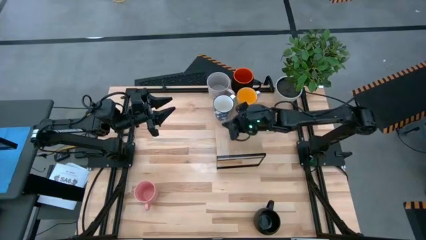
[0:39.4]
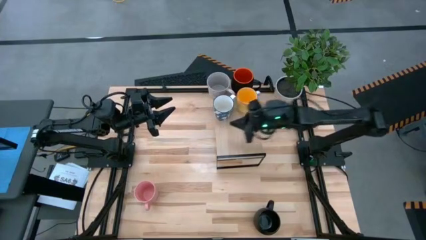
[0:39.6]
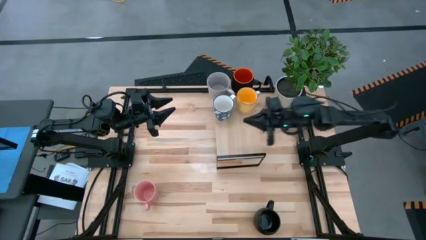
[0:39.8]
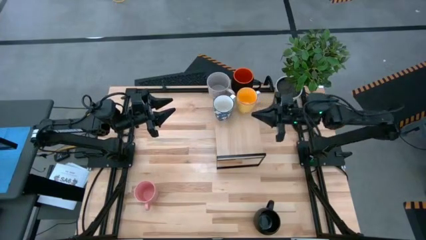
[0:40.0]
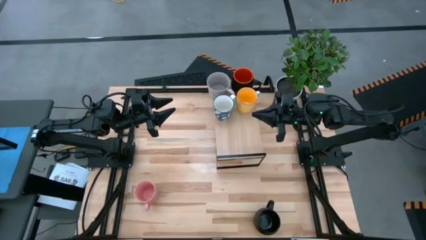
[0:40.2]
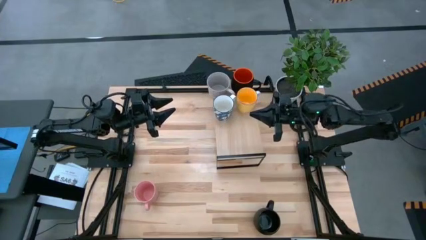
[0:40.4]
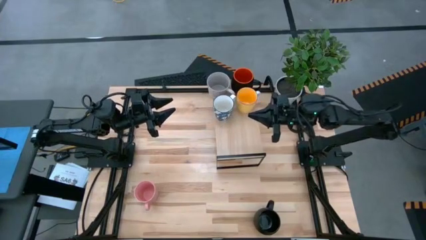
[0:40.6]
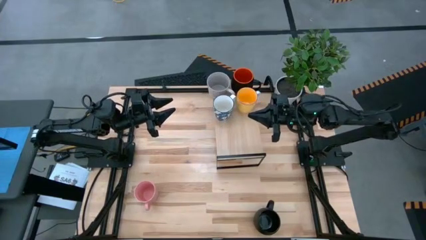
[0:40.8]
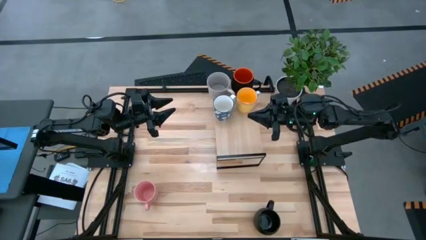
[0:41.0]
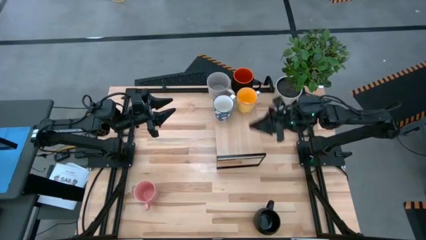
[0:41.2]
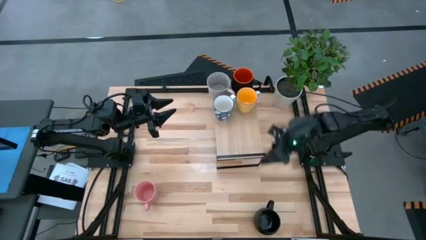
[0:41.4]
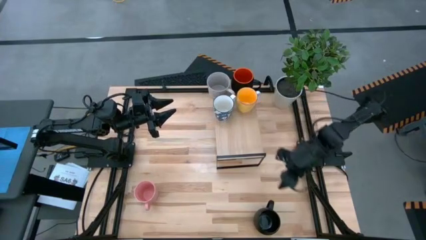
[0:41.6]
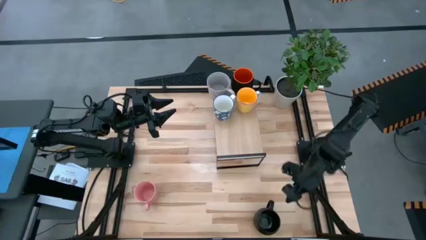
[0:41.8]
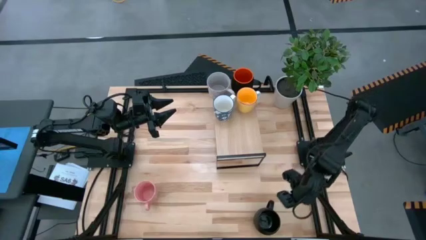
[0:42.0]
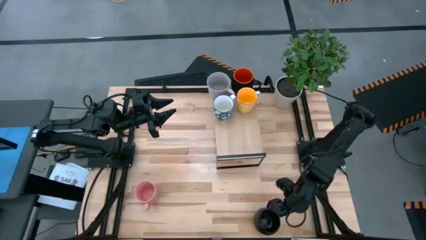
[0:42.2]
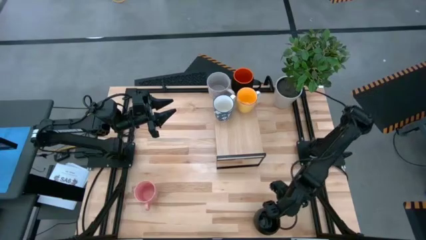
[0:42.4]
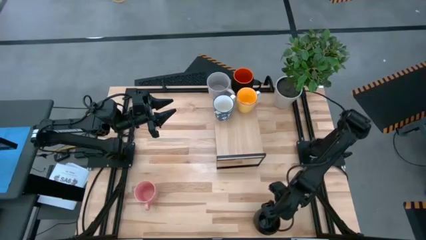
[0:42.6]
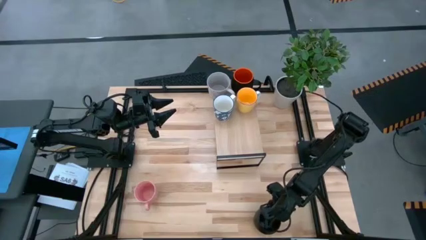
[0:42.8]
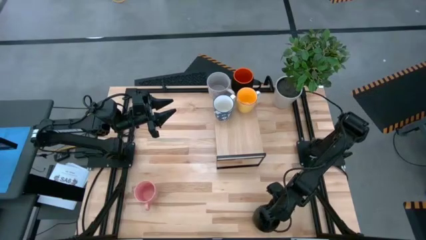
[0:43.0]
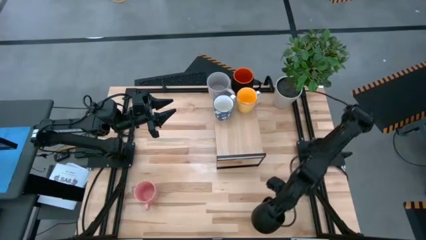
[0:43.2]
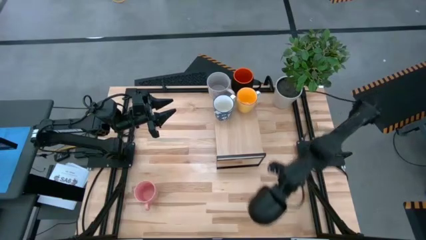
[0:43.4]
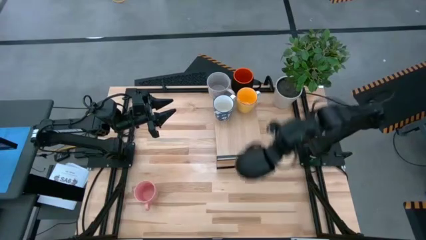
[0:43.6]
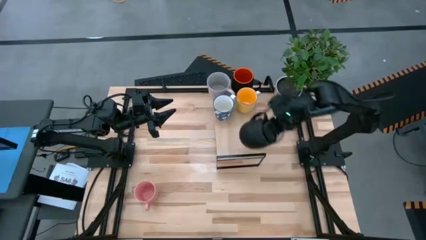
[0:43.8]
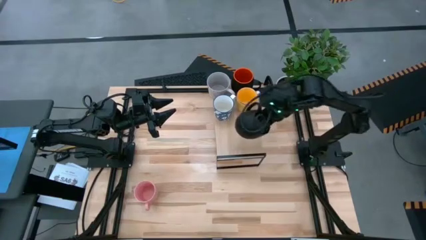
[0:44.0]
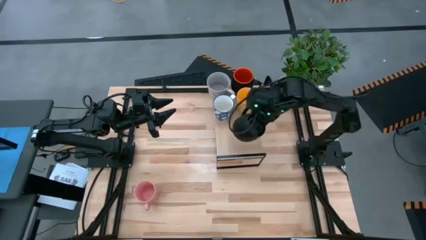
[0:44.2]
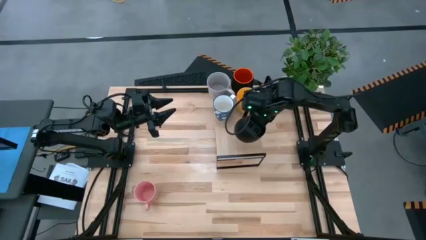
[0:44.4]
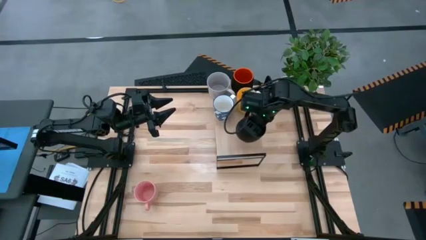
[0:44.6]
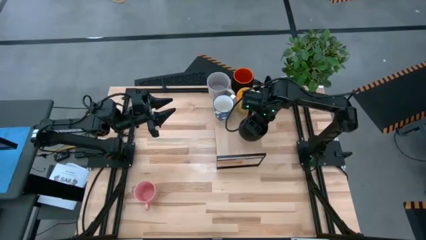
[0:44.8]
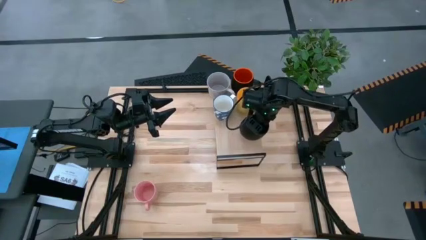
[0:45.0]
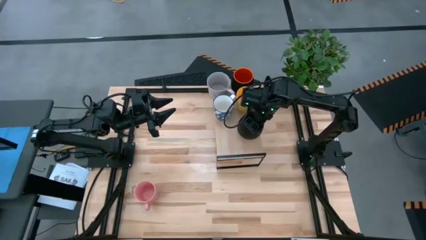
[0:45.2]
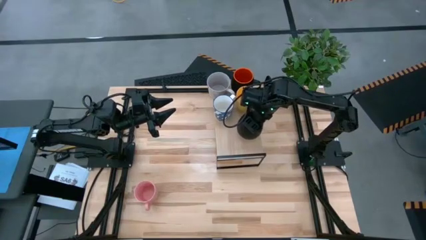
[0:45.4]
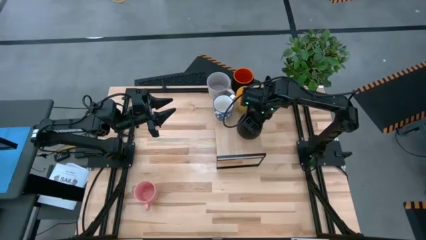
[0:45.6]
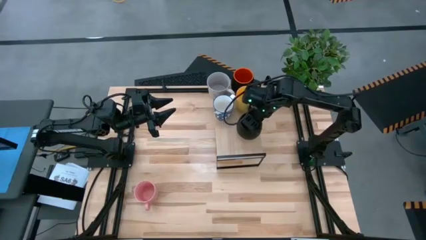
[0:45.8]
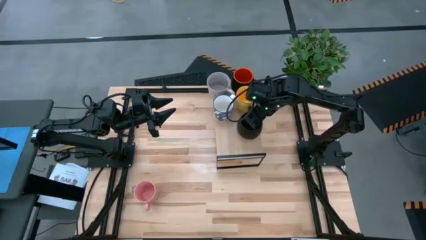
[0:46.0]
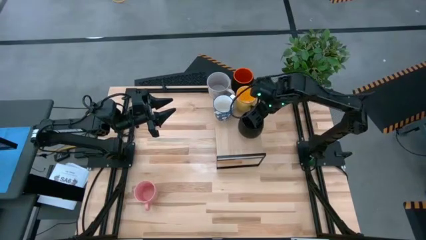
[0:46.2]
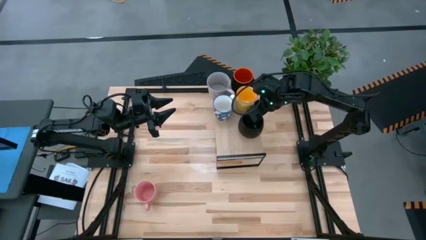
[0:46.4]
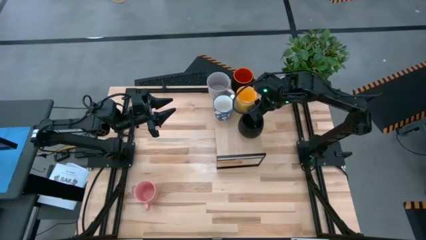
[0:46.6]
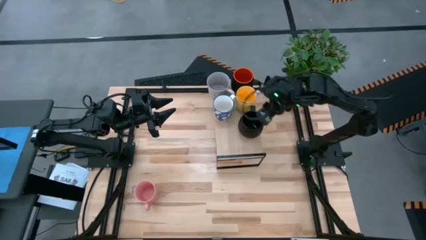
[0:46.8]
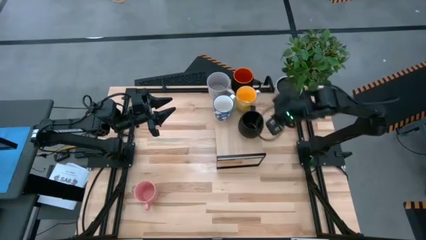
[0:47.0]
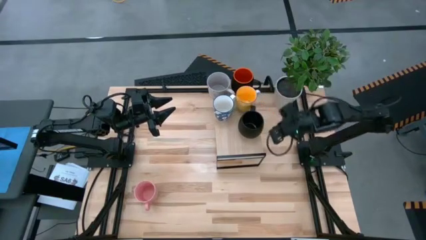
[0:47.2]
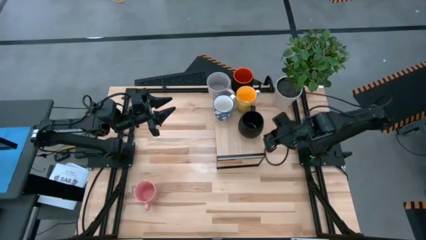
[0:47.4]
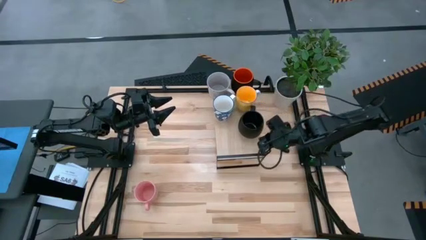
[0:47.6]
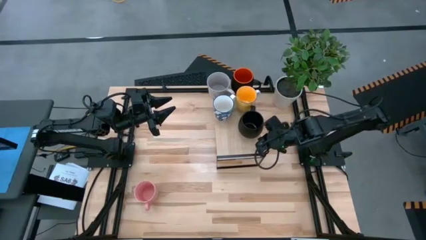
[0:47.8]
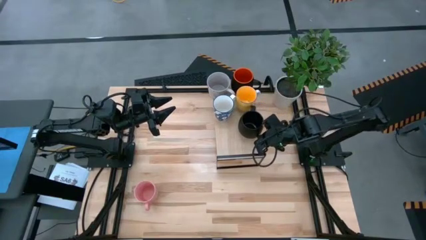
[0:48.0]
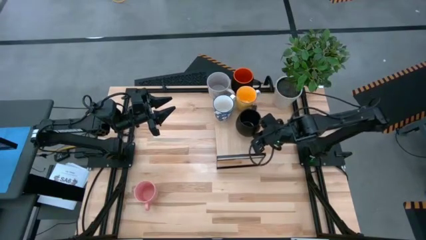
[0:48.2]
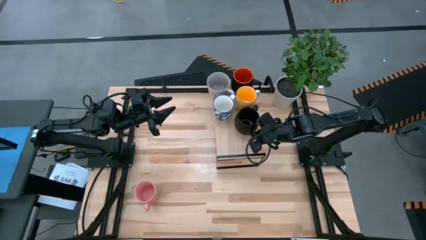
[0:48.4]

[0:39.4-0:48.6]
Task: Place coffee mugs
Put the black mug on the shelf

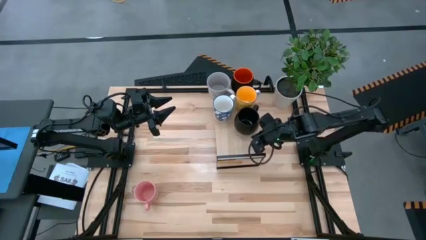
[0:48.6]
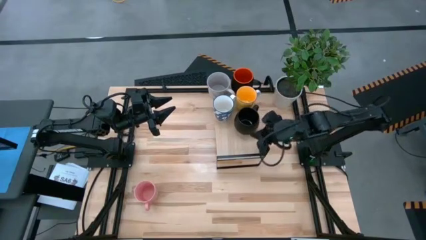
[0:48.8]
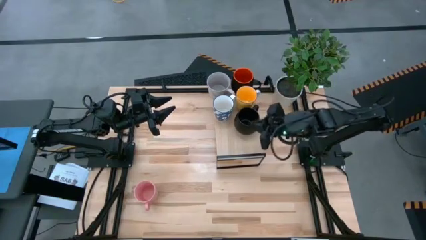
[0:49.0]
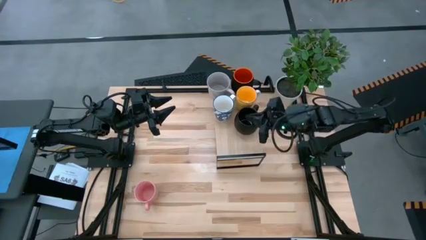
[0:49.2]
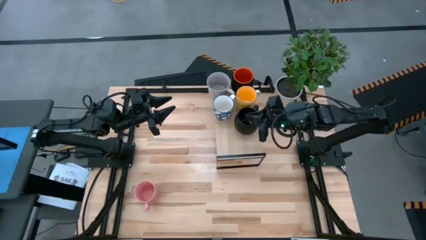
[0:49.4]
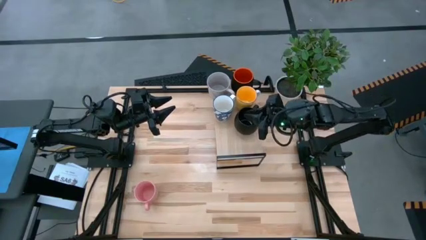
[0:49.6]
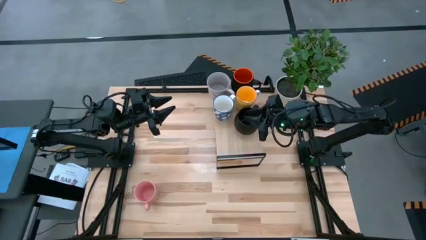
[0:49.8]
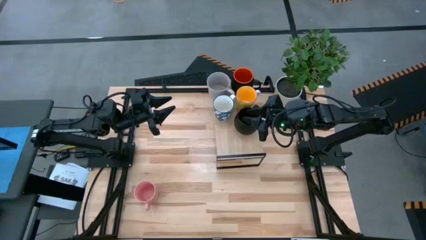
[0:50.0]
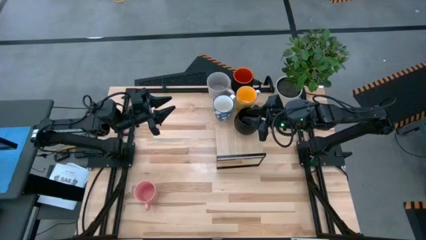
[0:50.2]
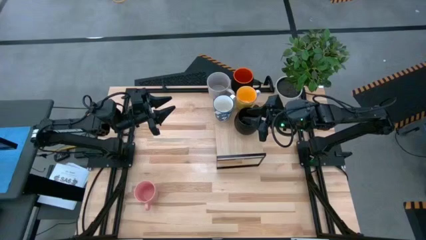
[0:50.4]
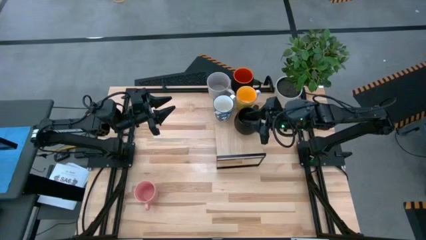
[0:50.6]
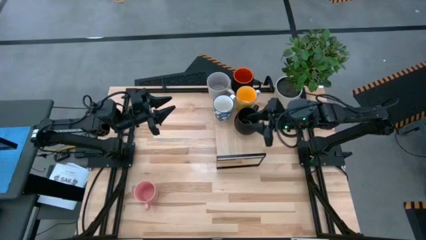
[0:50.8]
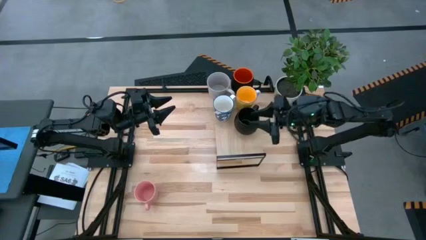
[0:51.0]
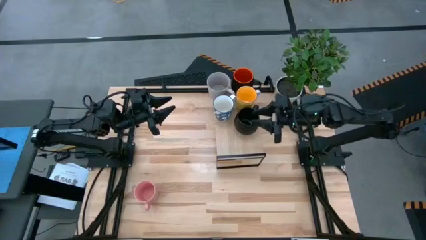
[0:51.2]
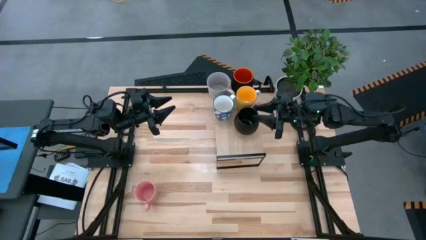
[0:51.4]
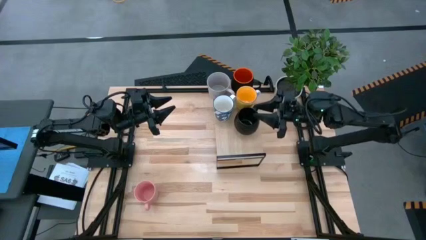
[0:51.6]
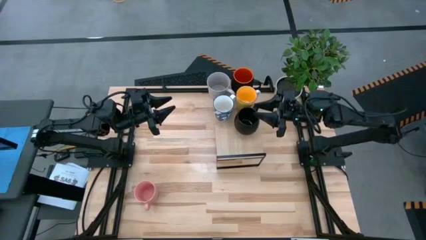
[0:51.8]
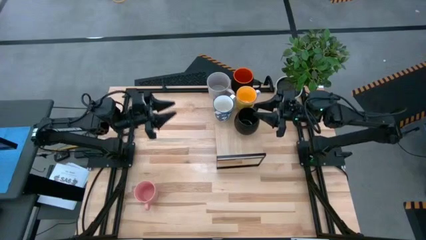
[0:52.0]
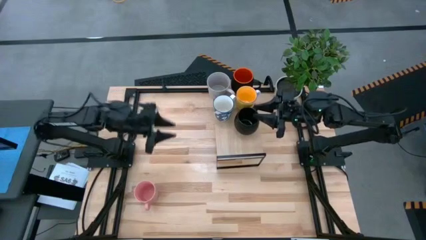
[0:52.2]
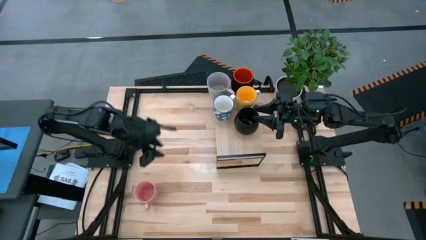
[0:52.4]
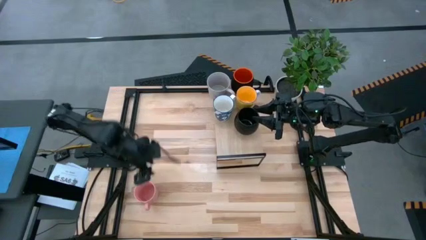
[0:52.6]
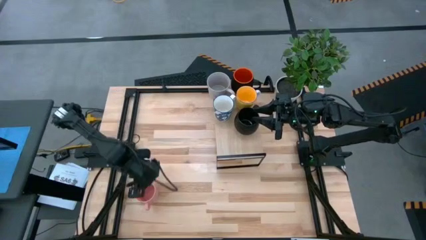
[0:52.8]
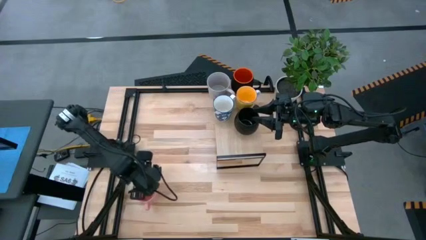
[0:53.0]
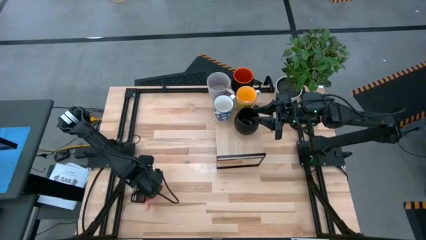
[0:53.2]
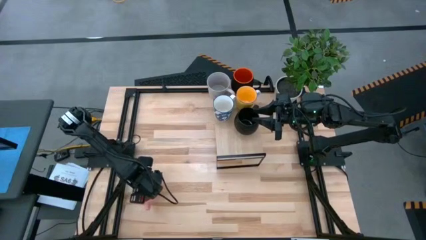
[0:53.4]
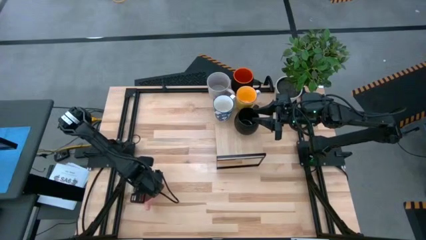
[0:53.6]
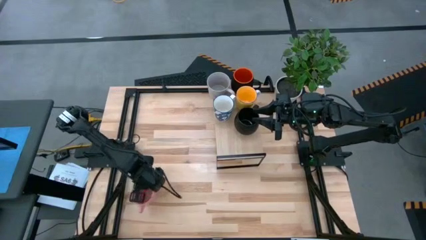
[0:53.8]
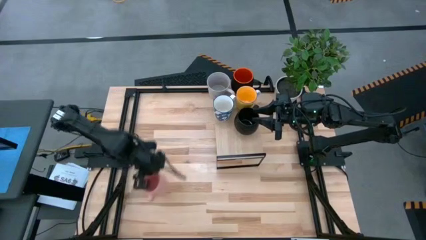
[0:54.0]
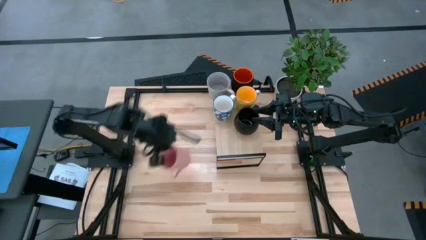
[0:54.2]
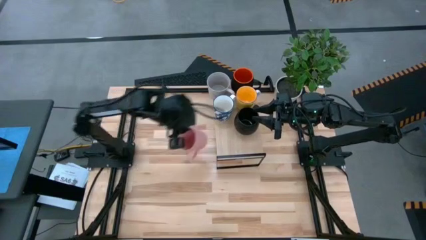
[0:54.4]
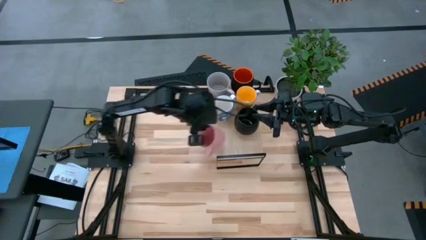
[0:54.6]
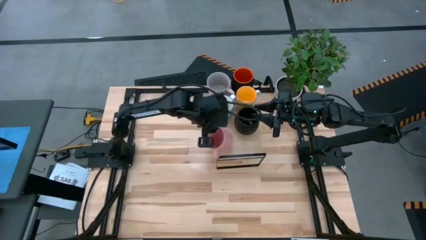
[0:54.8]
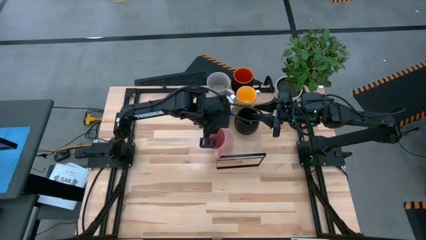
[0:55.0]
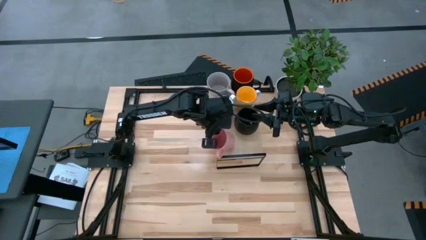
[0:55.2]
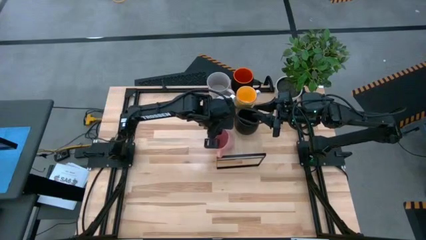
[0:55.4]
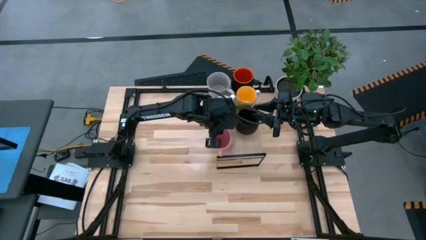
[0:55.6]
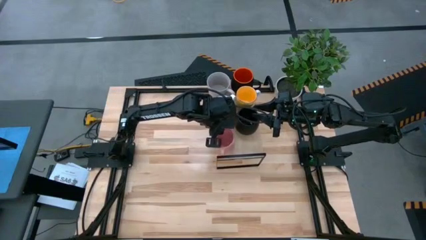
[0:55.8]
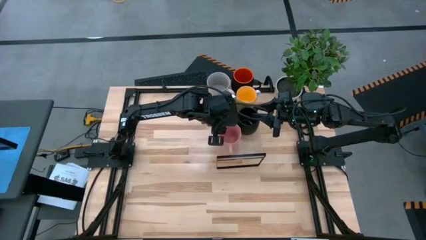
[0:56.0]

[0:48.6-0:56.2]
Put the pink mug on the shelf
